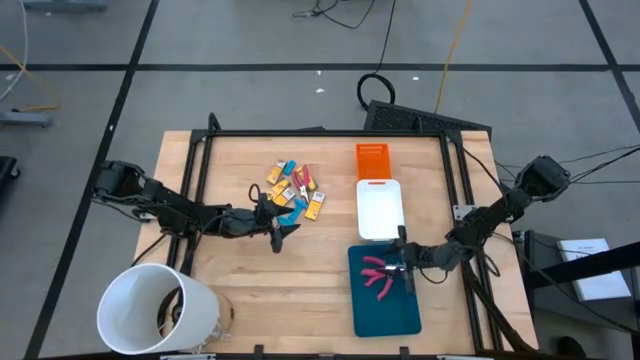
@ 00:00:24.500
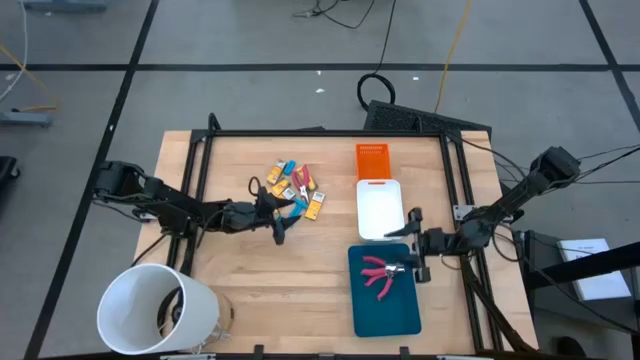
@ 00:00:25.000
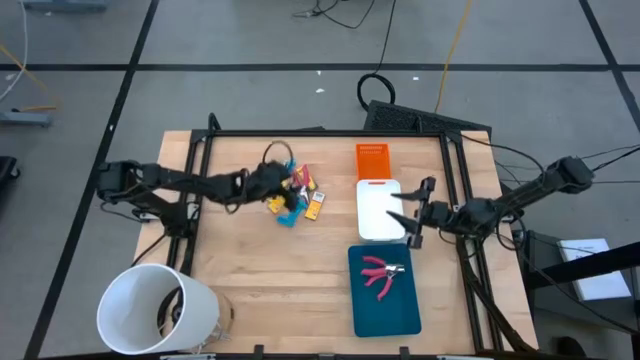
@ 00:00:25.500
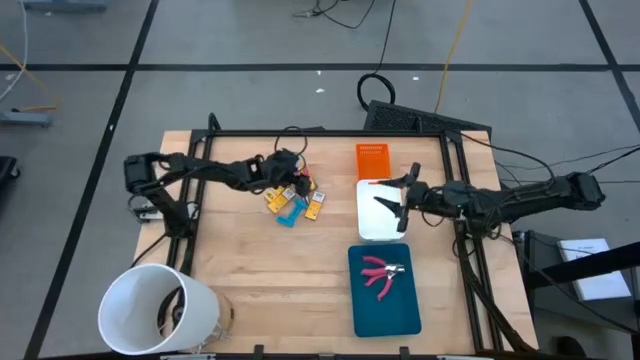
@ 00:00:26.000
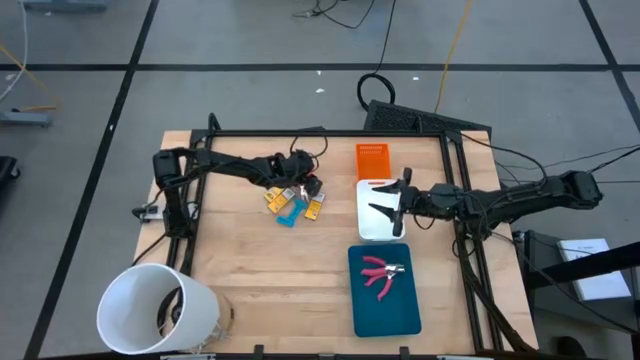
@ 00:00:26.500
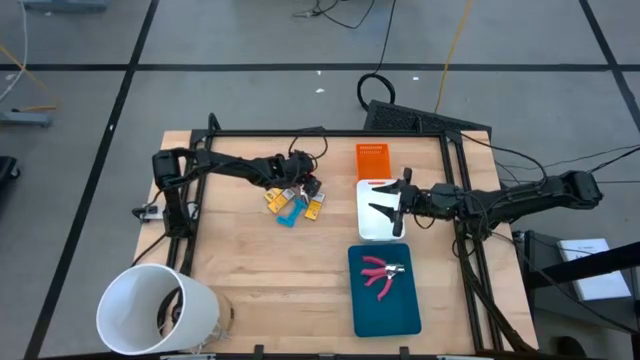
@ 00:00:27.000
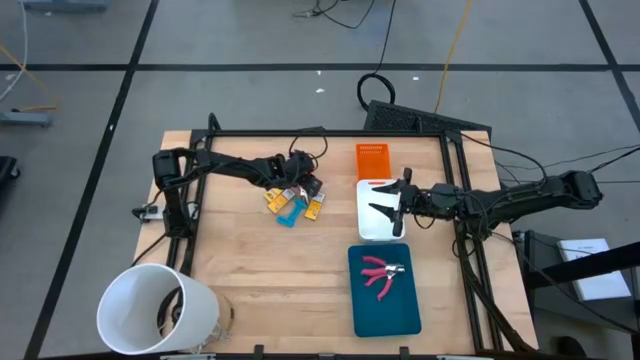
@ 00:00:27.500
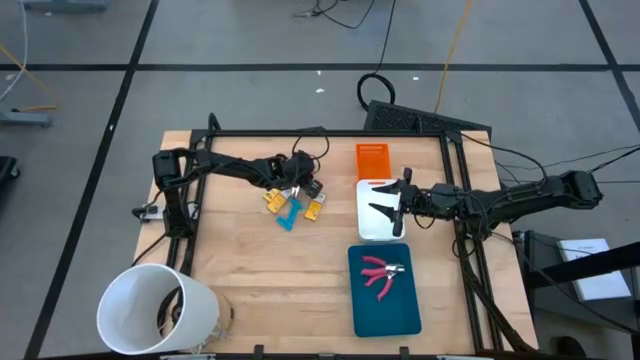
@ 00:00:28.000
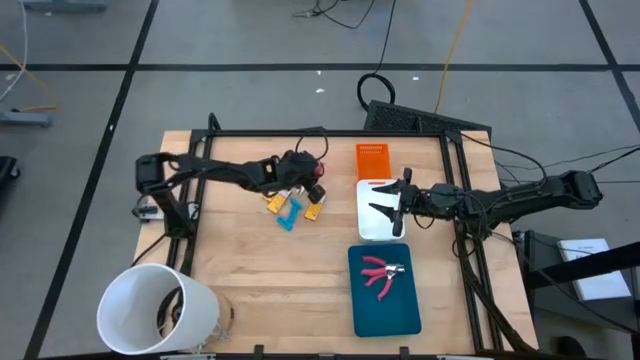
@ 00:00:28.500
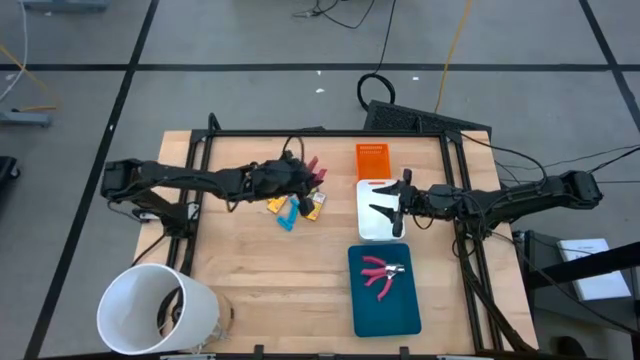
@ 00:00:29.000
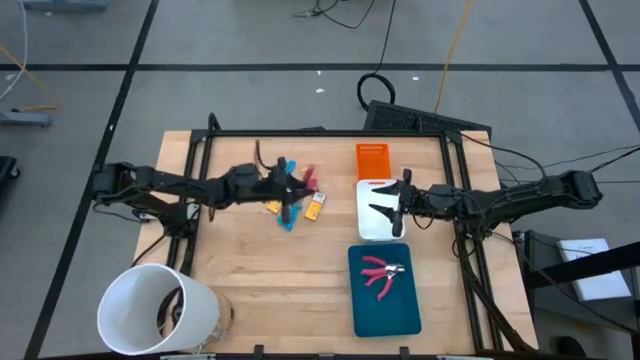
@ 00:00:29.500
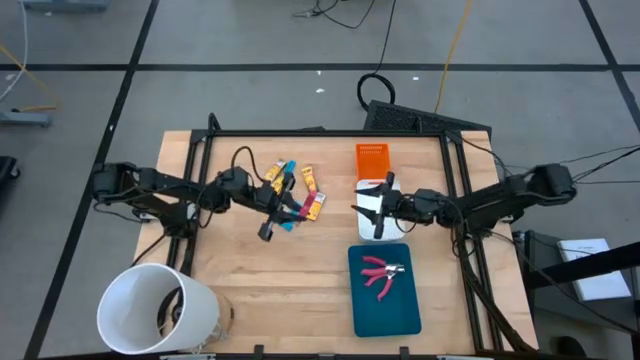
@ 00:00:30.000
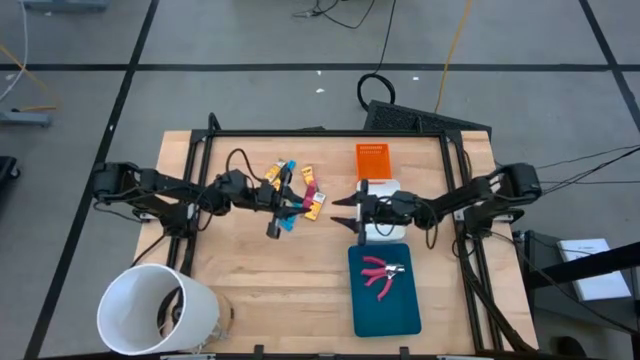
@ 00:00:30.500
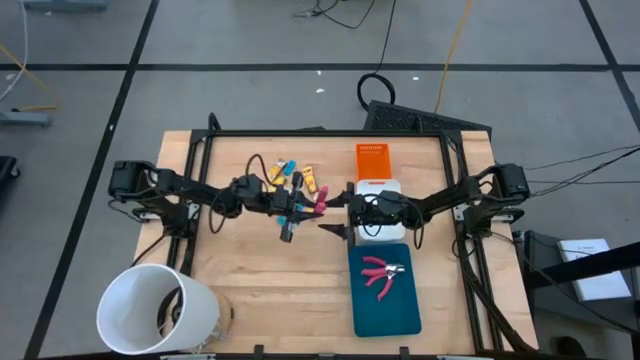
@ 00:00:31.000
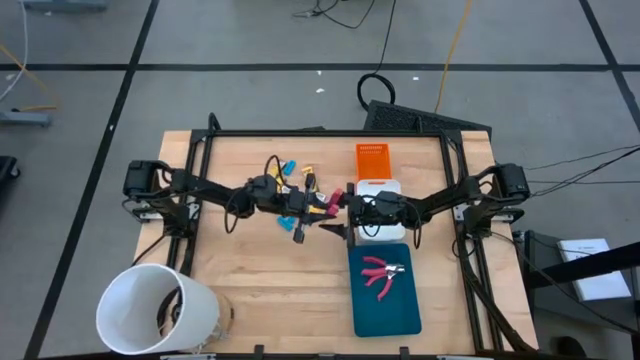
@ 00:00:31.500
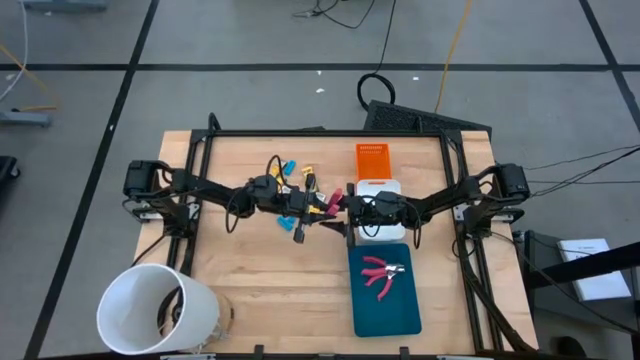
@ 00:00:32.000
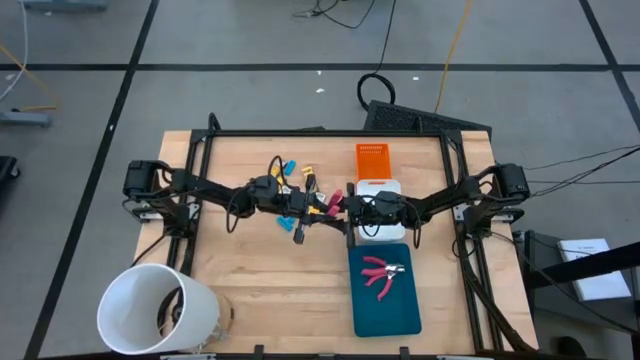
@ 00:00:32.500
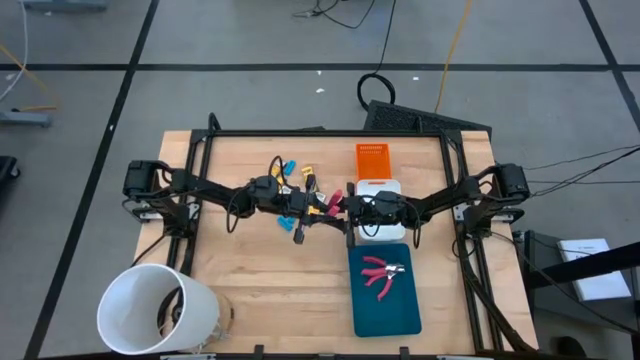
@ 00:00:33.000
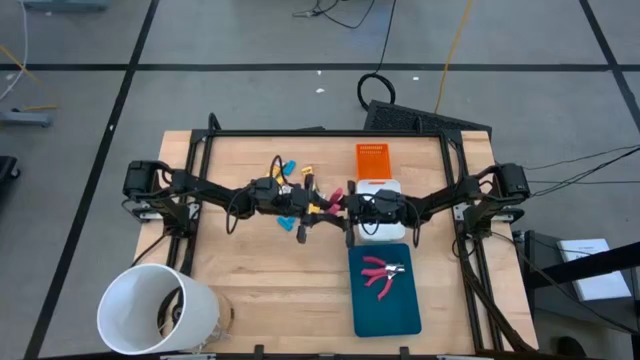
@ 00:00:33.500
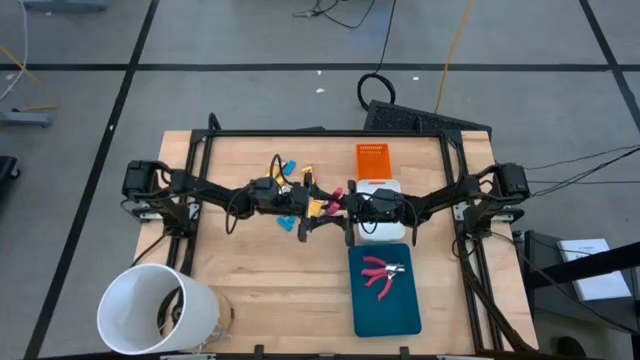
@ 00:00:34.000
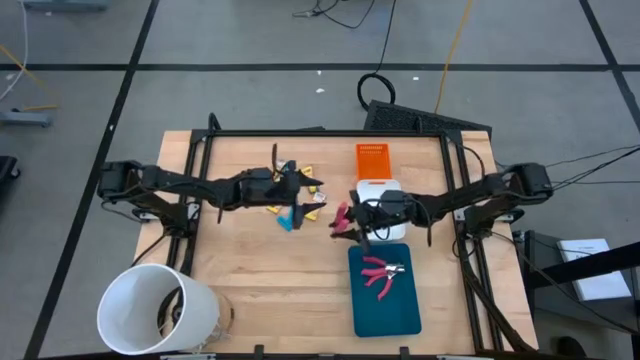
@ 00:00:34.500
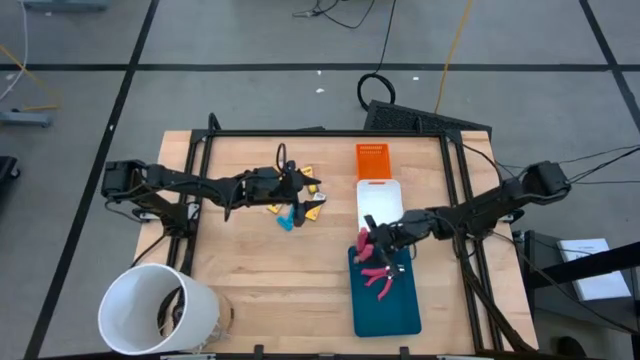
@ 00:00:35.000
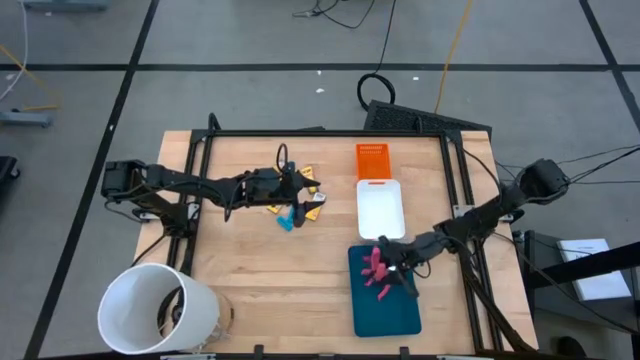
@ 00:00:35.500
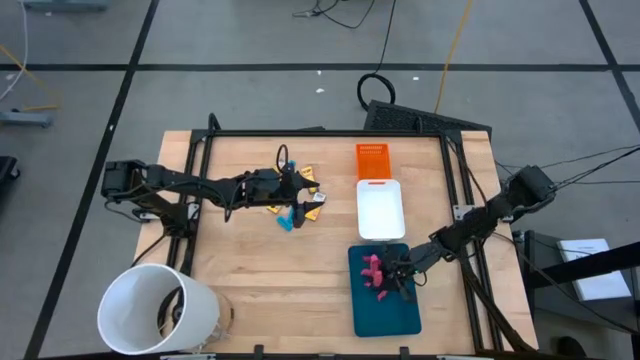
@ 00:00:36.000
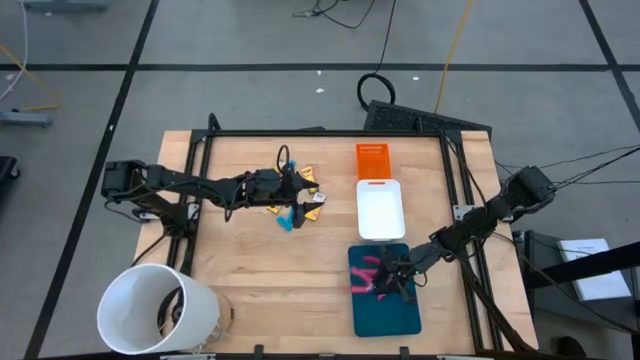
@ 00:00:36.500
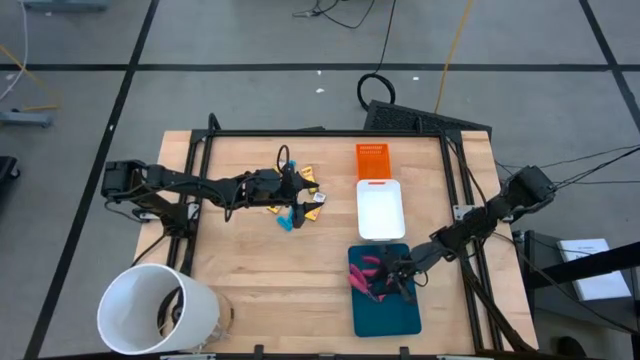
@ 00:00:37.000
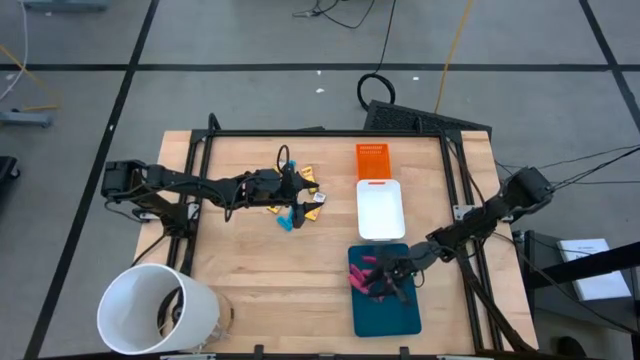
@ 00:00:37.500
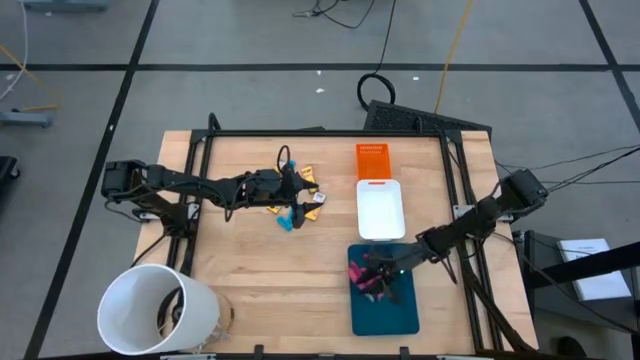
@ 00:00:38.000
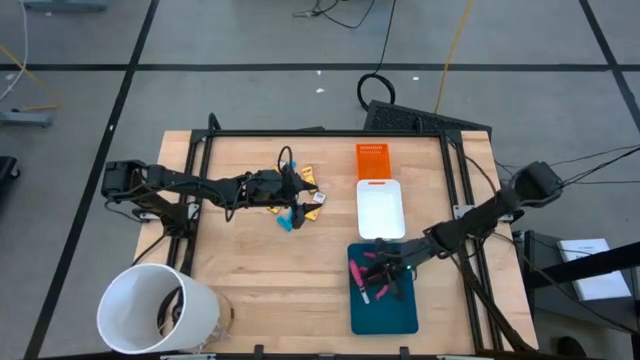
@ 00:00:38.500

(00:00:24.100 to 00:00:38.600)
Task: Pick & Place School Supplies
Put the pink puncher into the blue bin

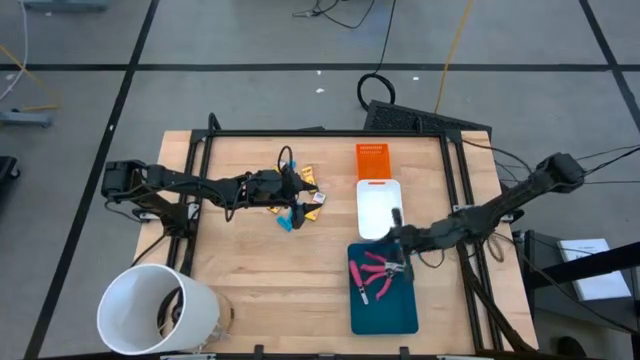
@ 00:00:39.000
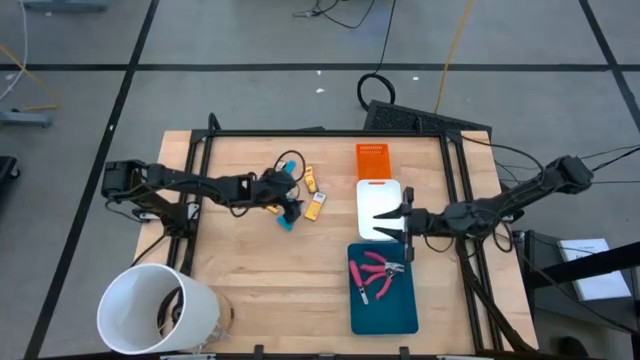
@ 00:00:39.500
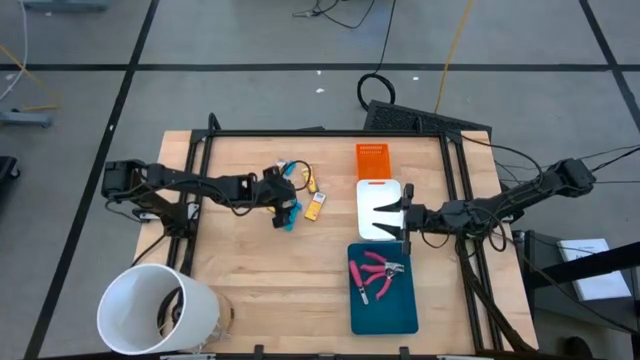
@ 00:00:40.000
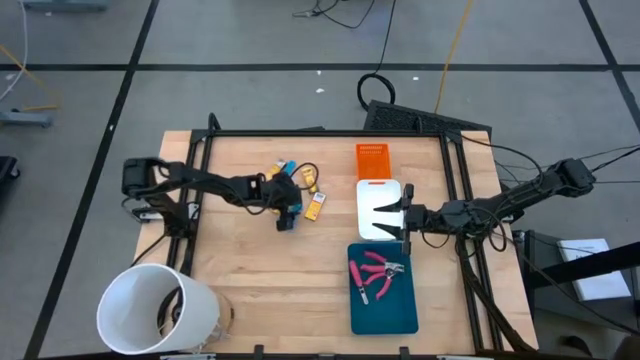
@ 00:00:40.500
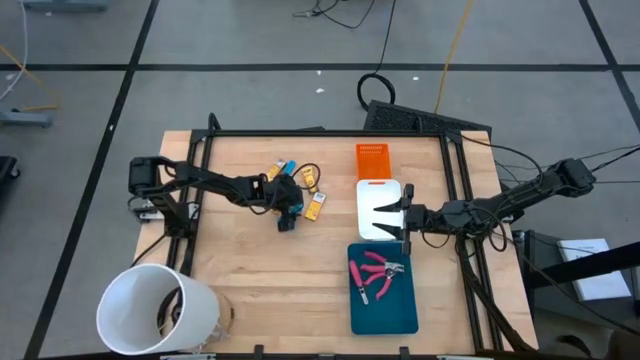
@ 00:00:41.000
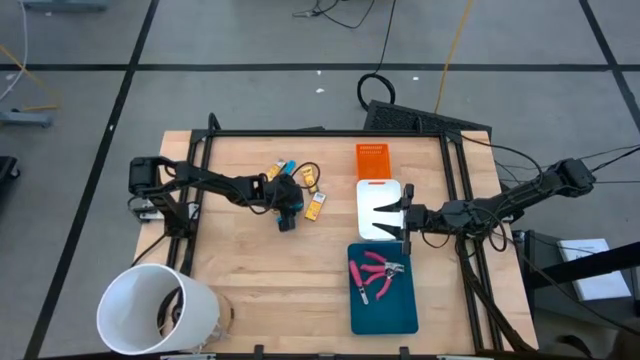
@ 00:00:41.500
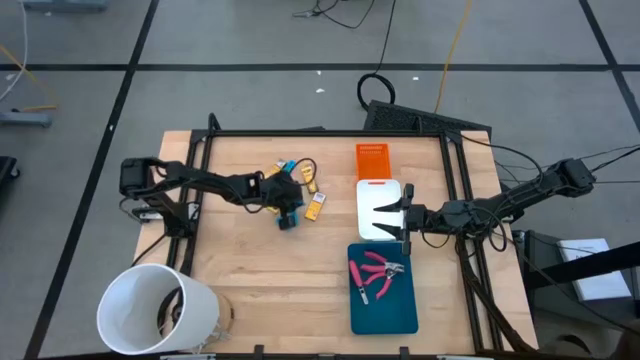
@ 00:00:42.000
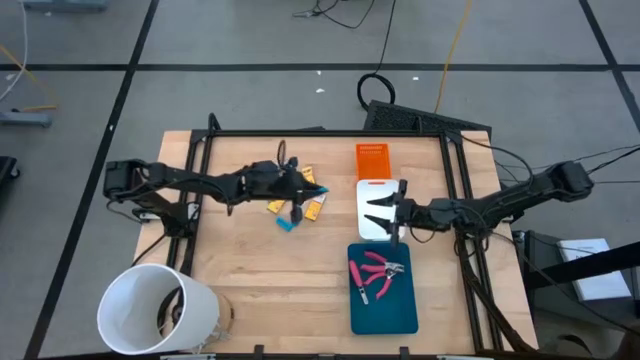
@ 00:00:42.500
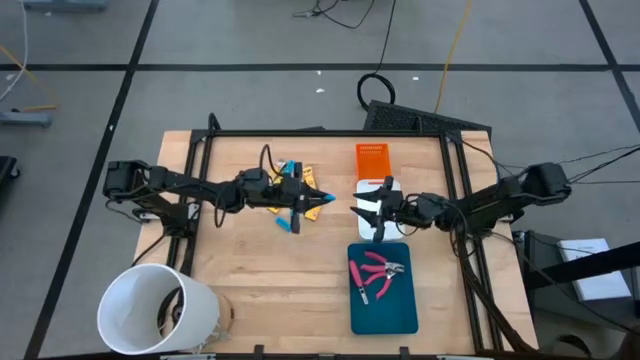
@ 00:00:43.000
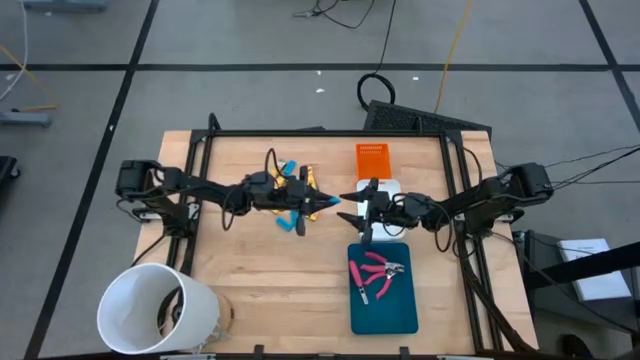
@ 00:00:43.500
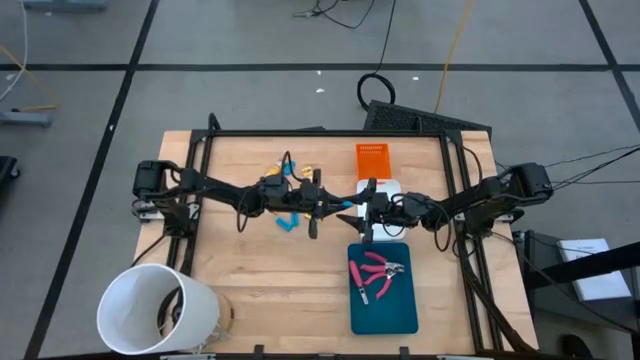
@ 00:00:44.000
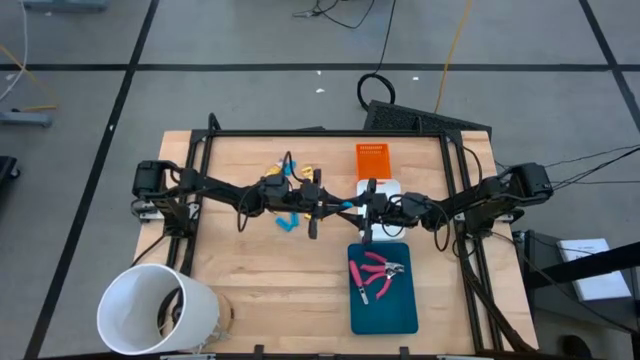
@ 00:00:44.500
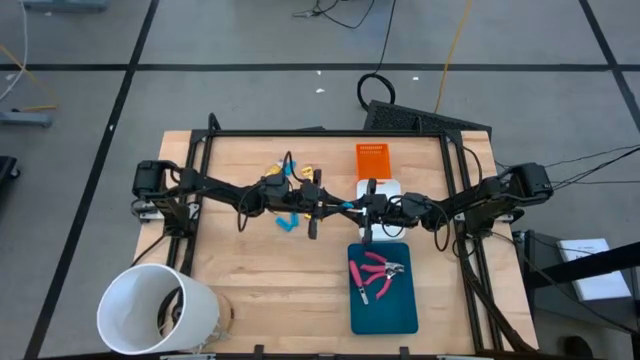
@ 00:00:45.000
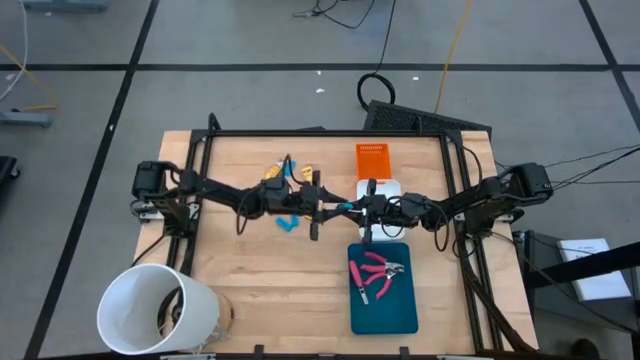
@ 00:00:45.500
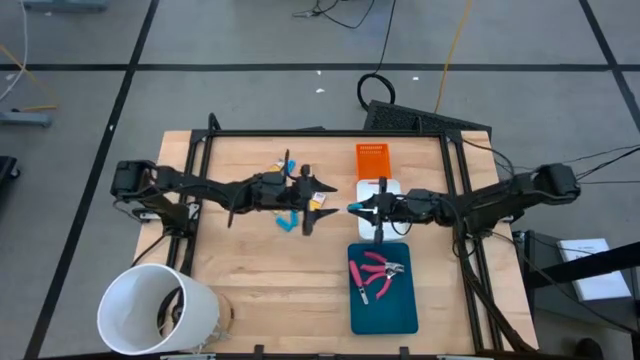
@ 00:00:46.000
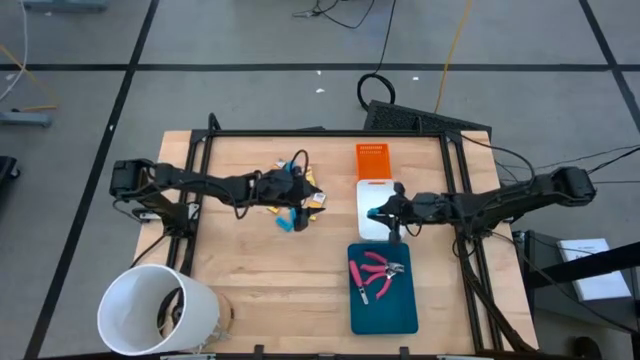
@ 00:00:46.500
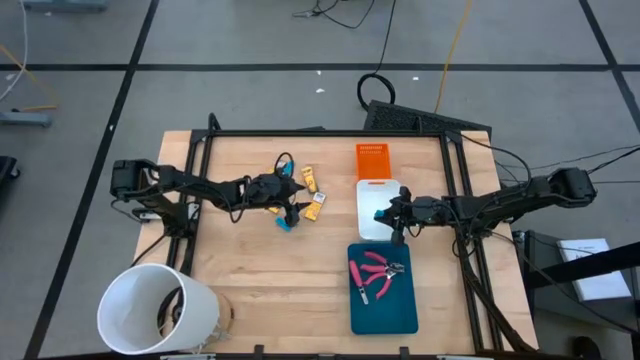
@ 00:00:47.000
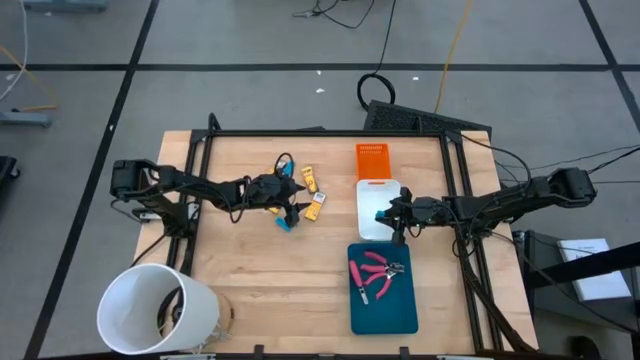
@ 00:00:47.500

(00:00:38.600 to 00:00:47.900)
Put the blue eraser into the white bin
